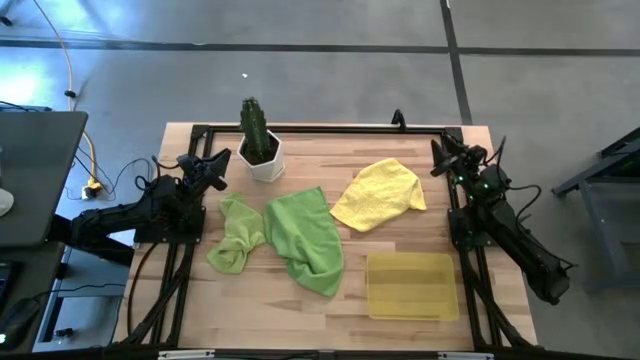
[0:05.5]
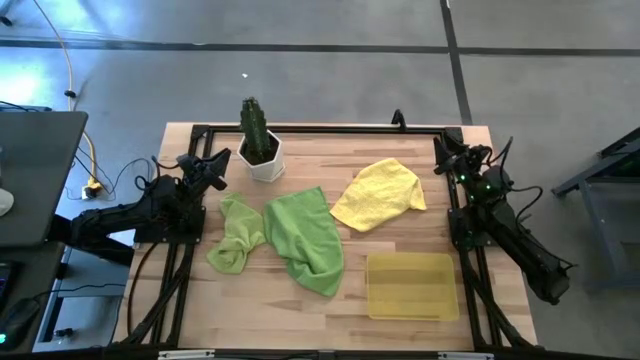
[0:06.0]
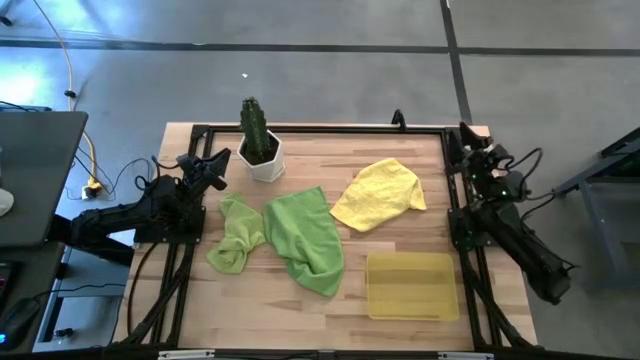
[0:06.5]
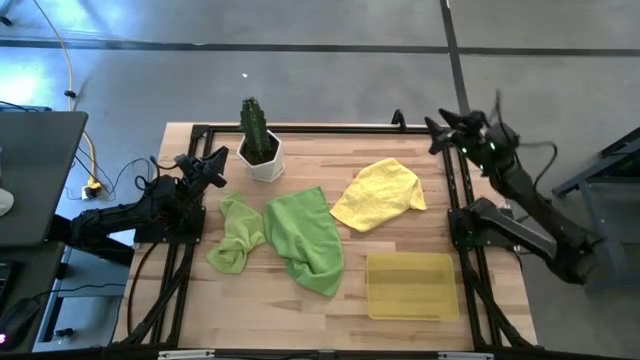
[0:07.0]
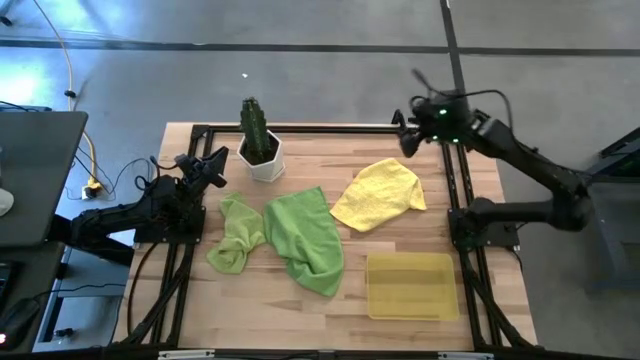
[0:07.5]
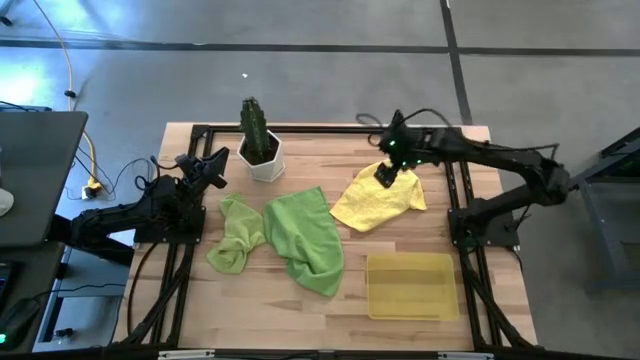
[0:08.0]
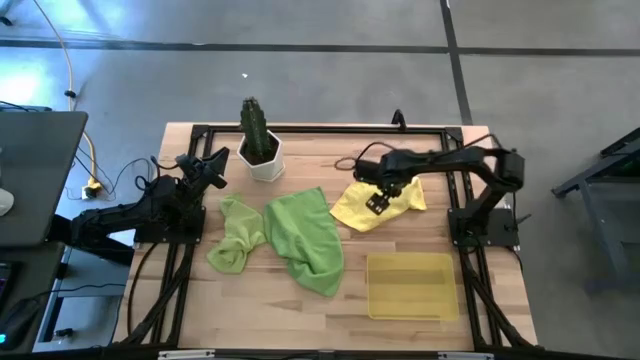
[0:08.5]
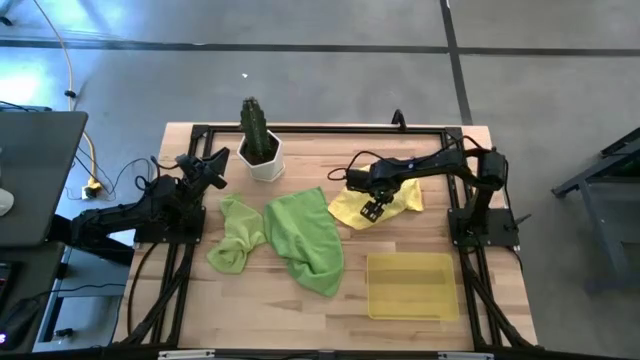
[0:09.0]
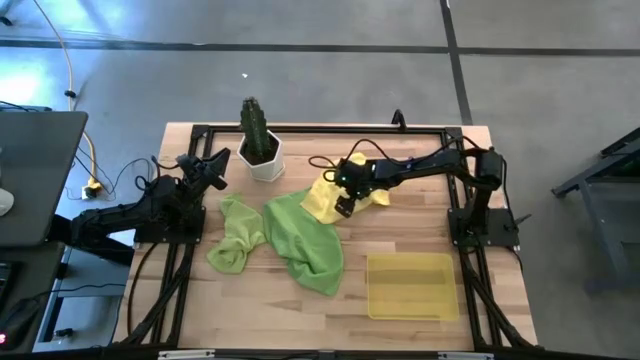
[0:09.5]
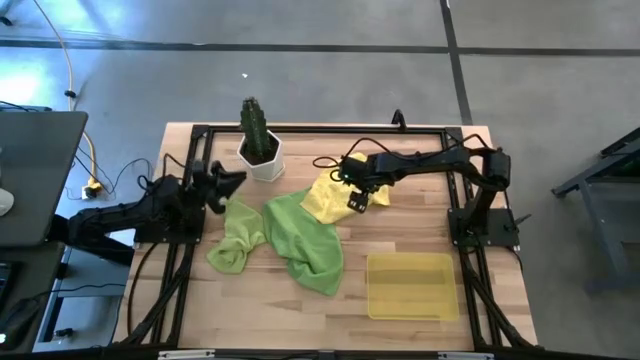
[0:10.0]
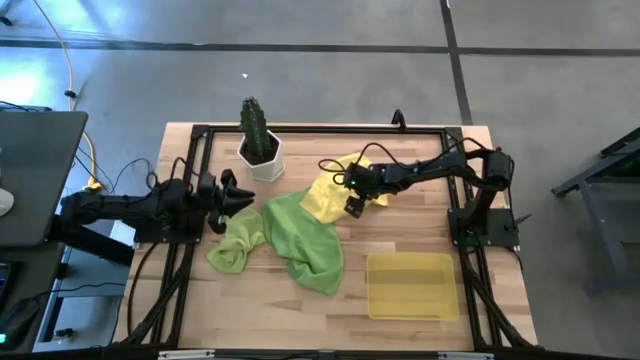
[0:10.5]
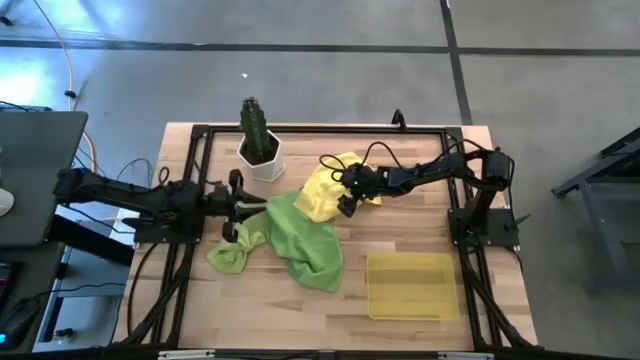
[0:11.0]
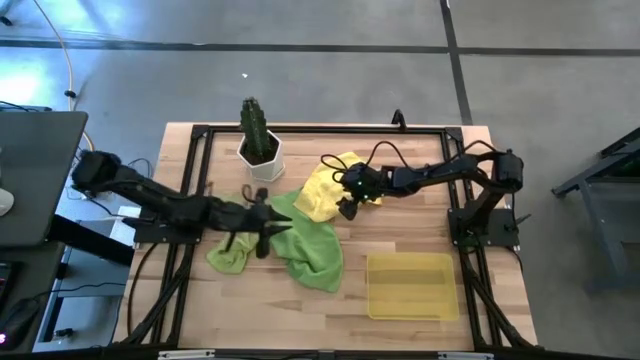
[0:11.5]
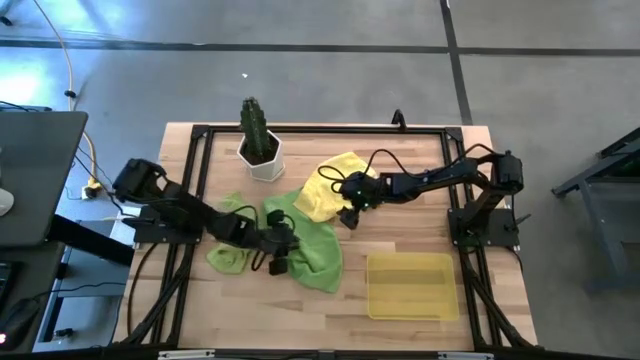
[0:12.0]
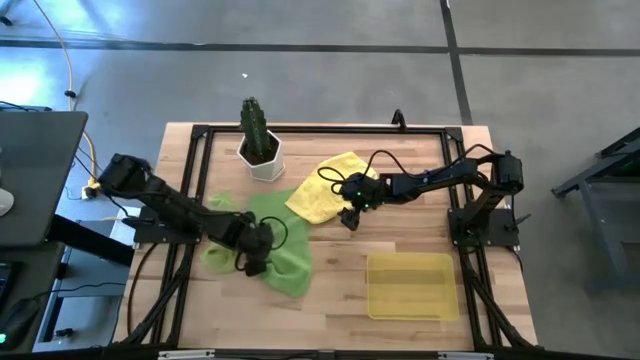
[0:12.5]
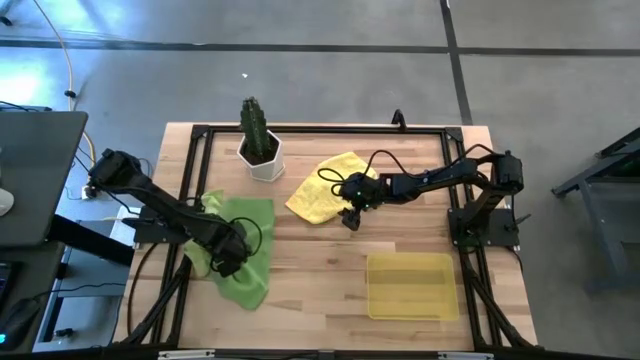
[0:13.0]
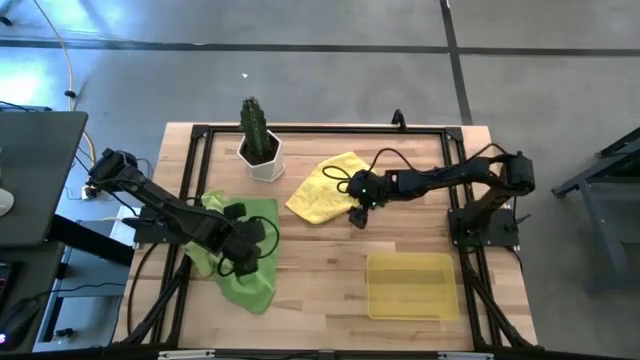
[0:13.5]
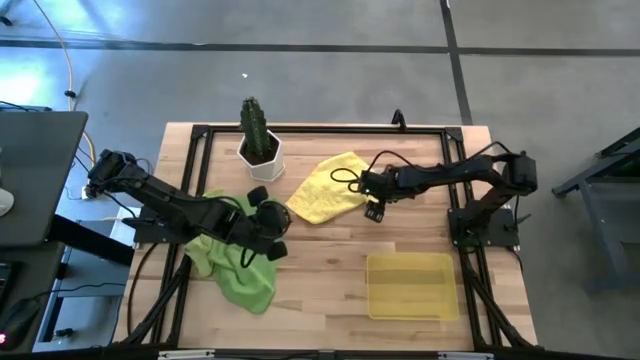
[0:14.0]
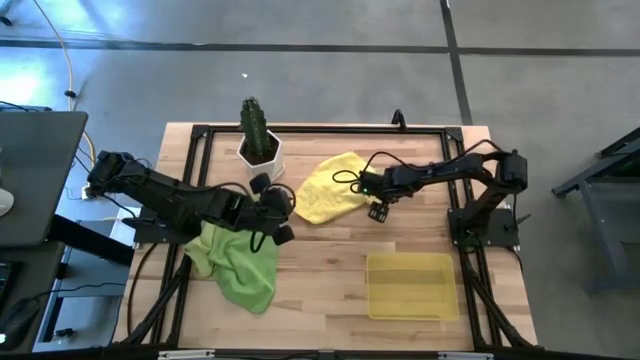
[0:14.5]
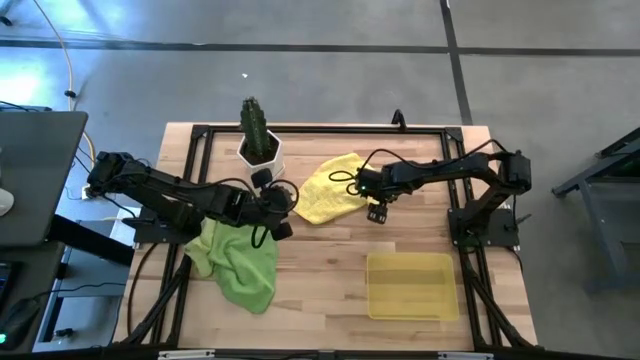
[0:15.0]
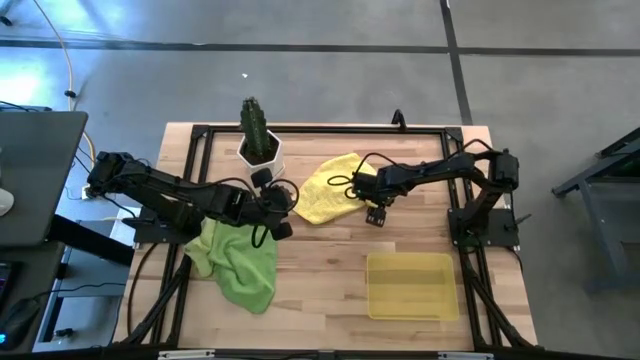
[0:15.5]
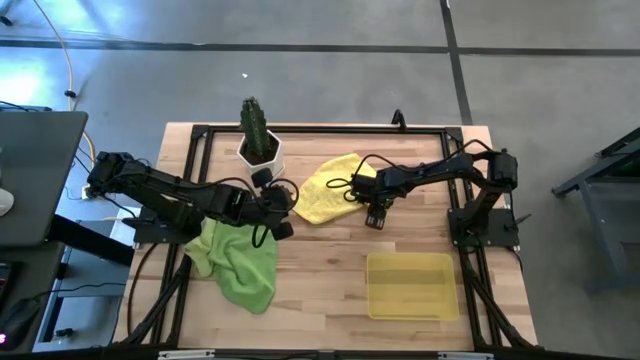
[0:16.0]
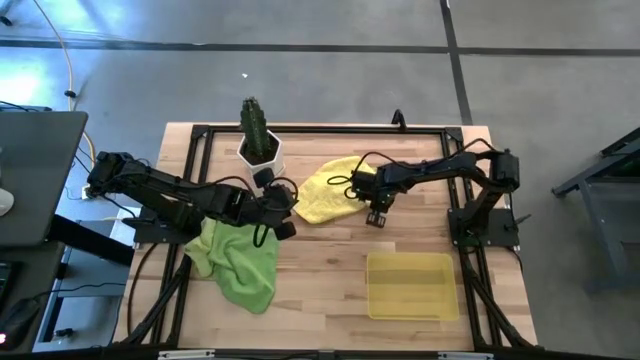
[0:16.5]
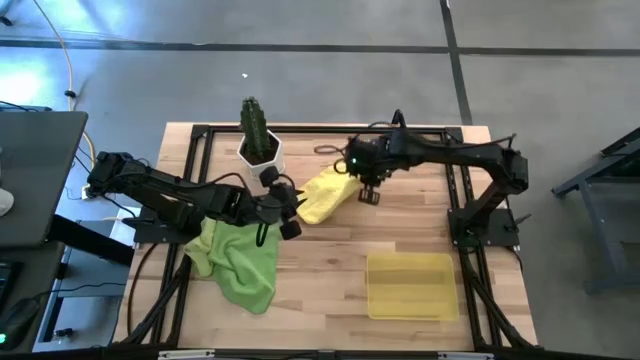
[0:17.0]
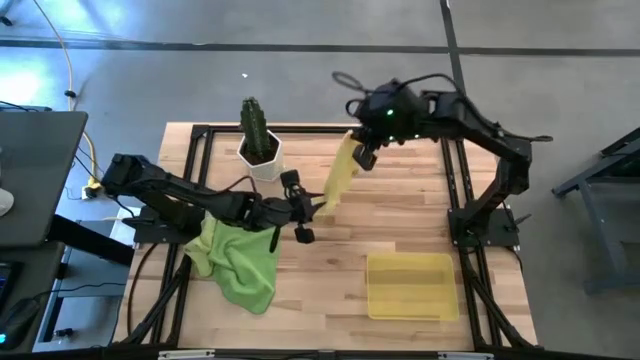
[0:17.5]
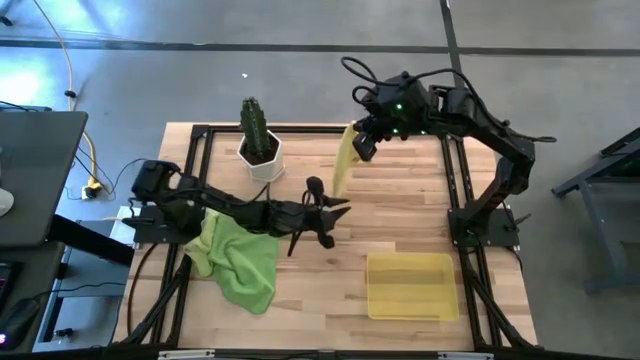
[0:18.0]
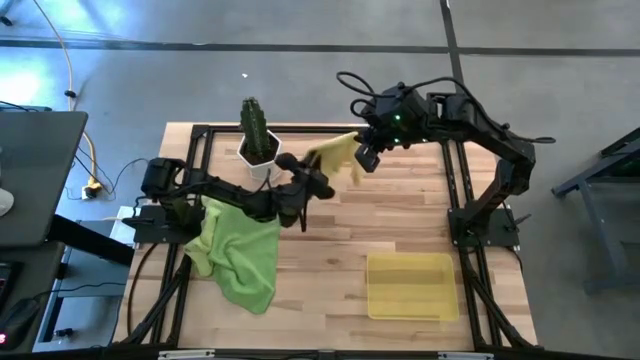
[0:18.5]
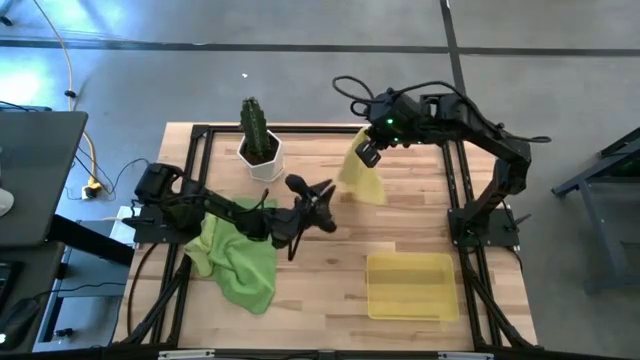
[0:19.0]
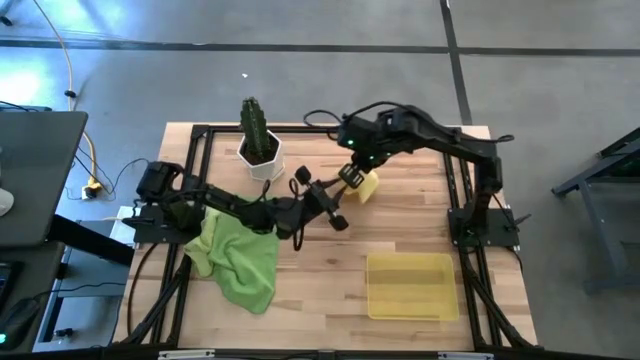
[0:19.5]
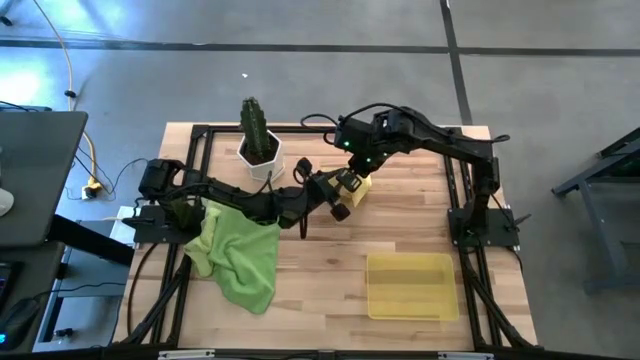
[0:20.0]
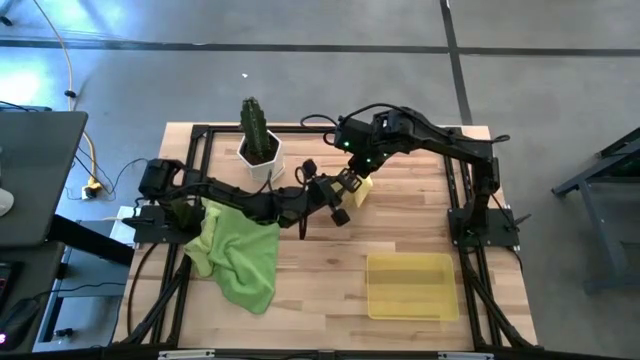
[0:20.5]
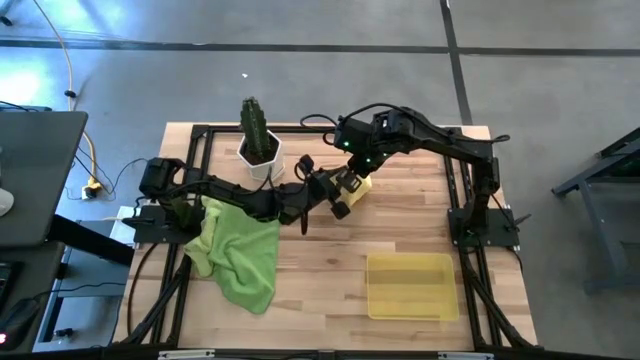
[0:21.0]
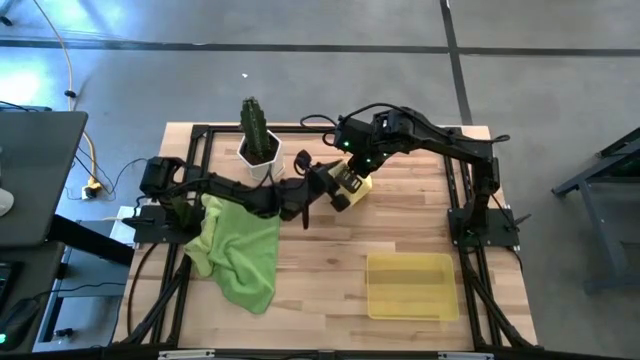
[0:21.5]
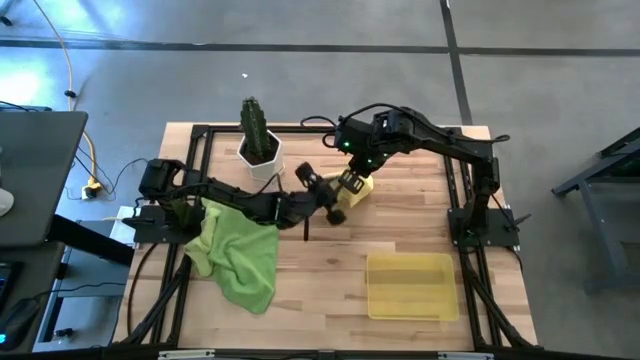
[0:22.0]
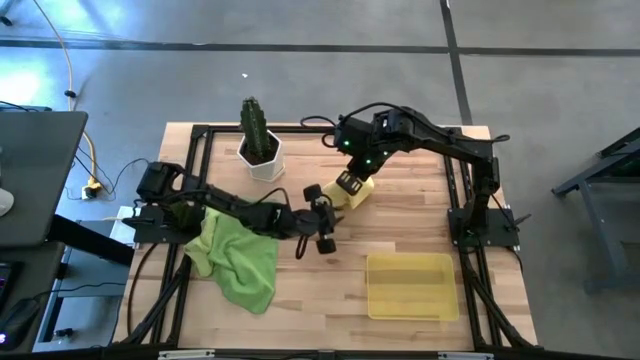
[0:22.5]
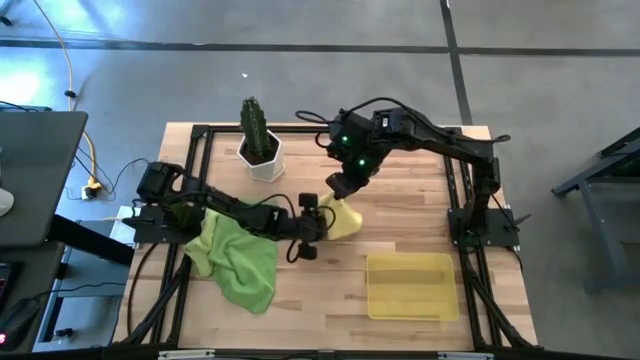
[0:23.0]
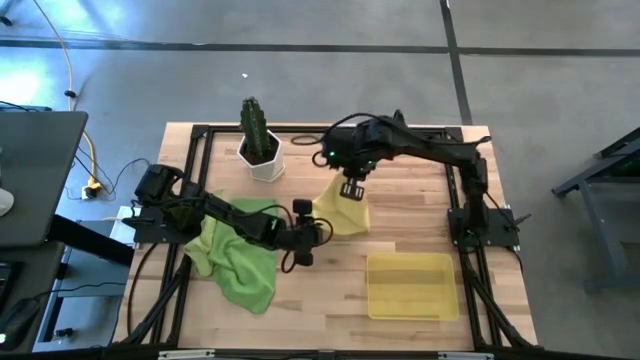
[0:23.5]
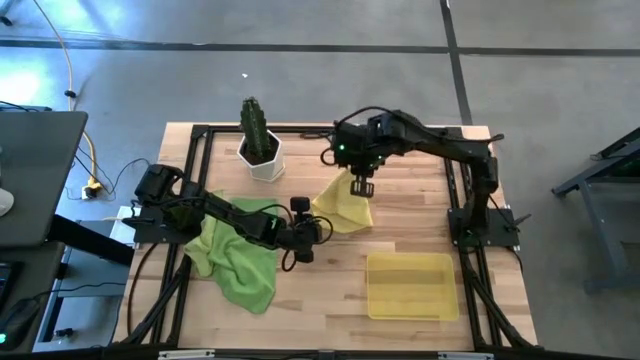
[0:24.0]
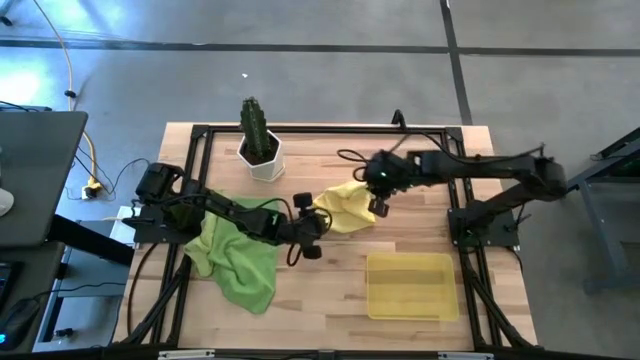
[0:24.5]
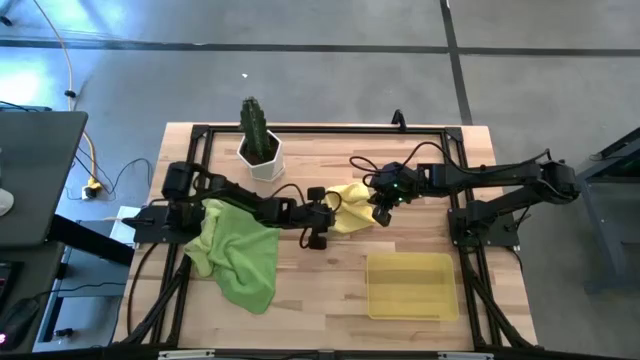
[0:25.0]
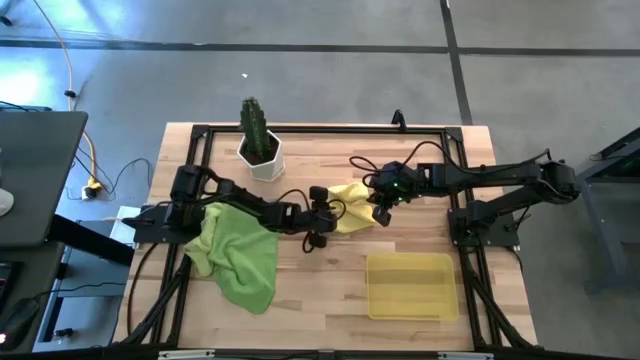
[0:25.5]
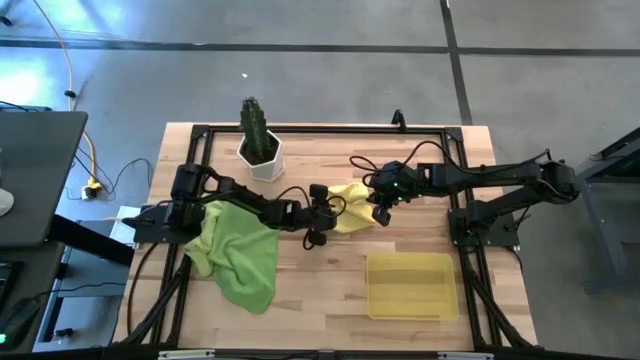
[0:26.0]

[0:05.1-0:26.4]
Task: Roll microfiber towels into tight, uniform cylinder then place into a basket
Fold the yellow towel
